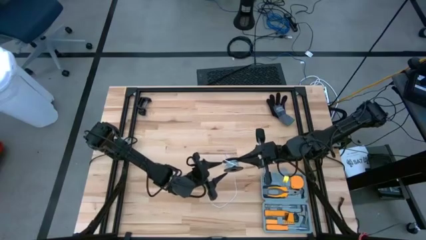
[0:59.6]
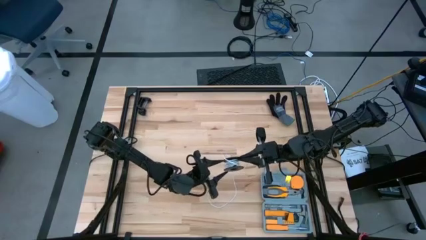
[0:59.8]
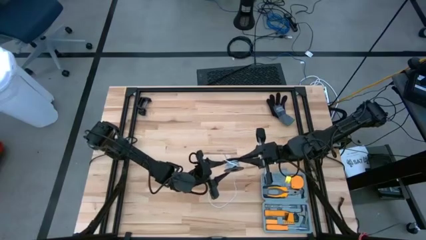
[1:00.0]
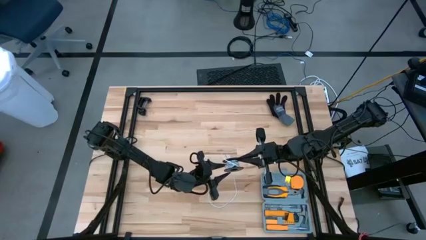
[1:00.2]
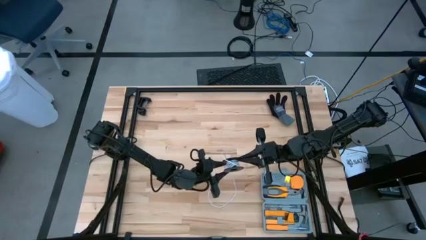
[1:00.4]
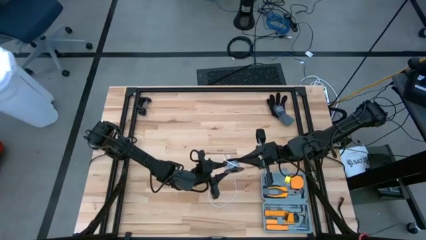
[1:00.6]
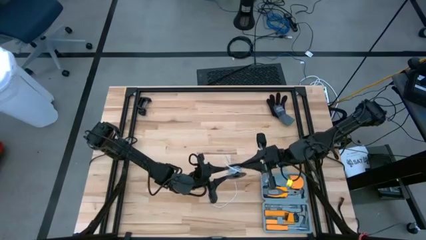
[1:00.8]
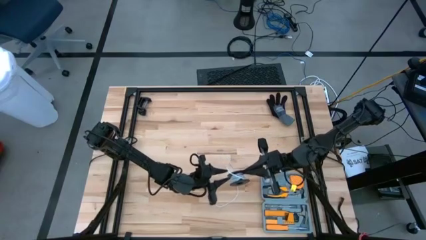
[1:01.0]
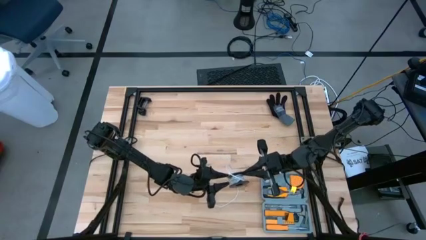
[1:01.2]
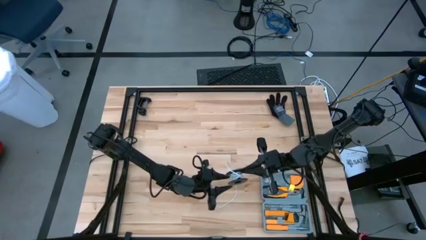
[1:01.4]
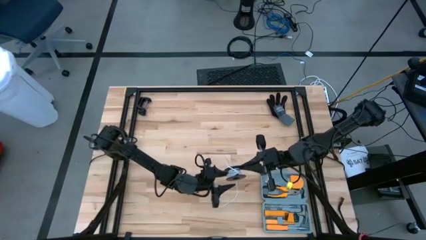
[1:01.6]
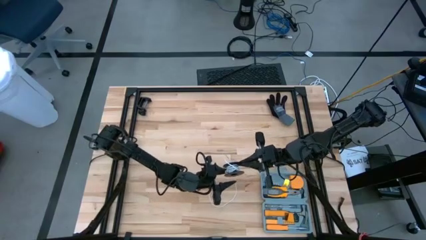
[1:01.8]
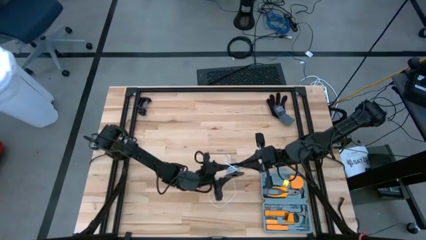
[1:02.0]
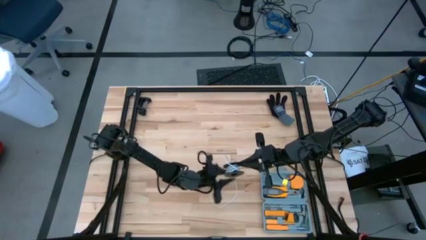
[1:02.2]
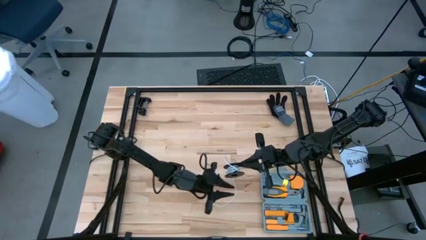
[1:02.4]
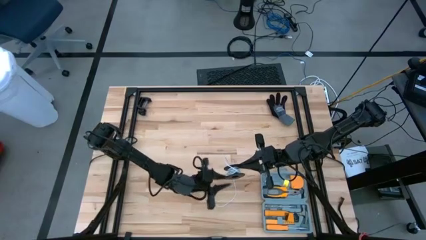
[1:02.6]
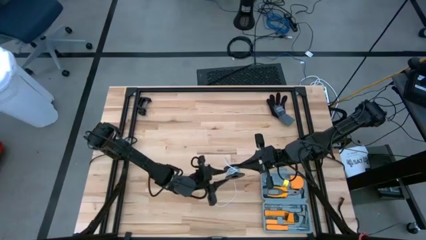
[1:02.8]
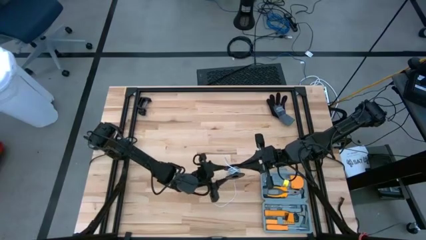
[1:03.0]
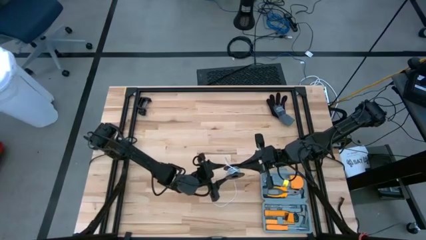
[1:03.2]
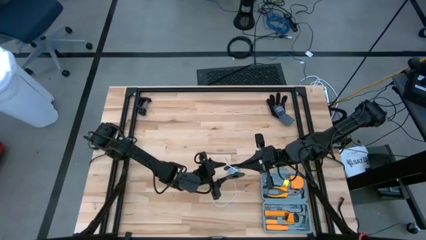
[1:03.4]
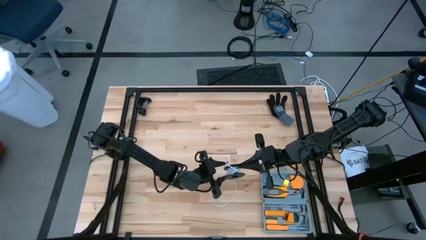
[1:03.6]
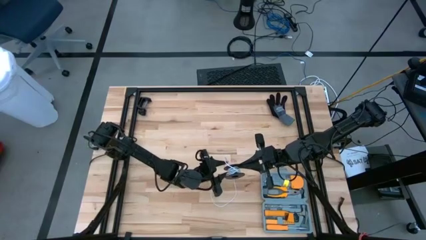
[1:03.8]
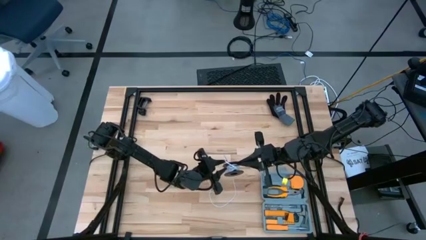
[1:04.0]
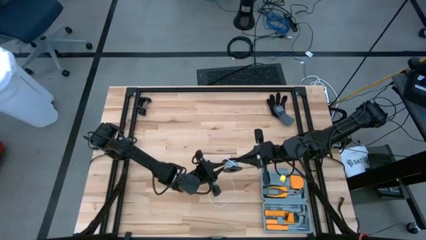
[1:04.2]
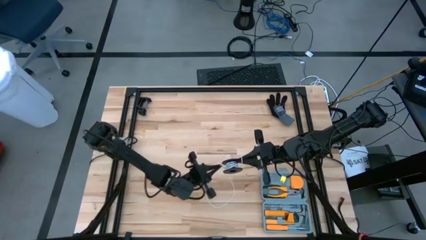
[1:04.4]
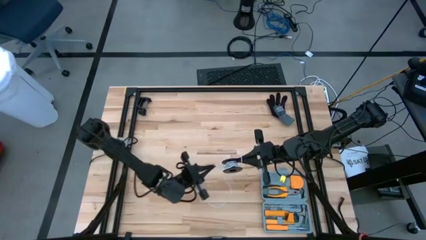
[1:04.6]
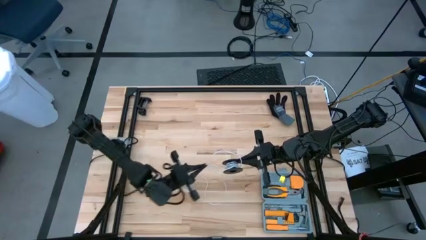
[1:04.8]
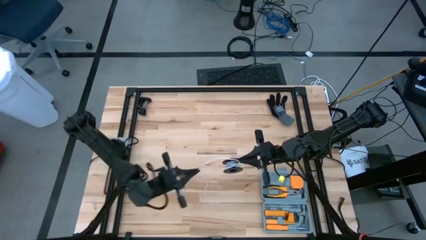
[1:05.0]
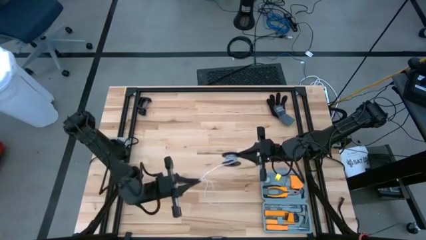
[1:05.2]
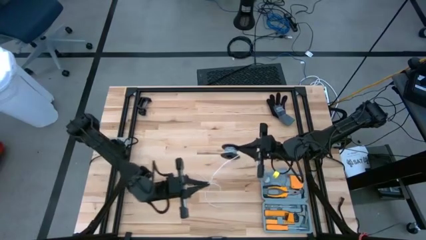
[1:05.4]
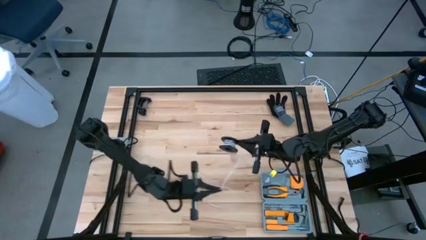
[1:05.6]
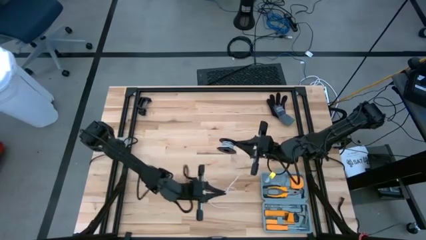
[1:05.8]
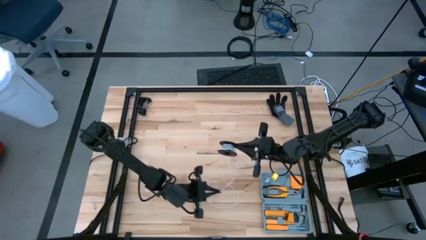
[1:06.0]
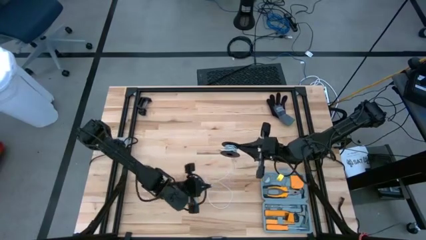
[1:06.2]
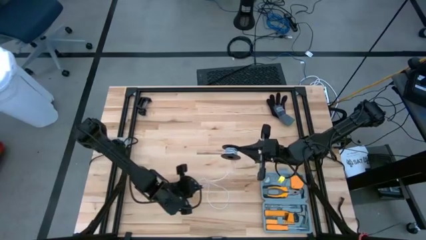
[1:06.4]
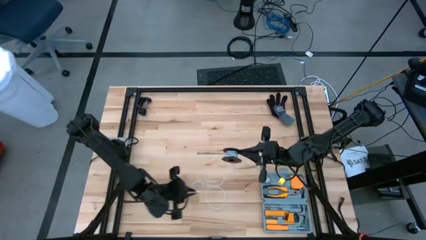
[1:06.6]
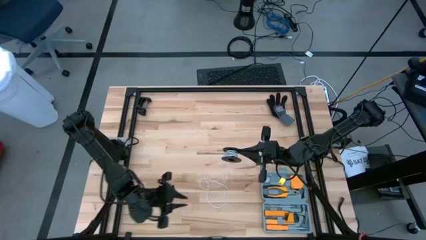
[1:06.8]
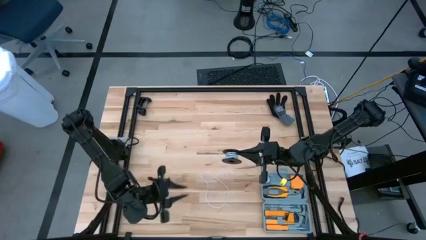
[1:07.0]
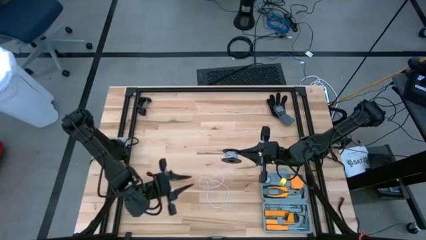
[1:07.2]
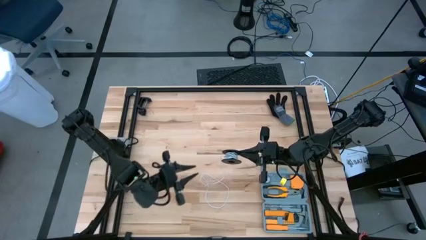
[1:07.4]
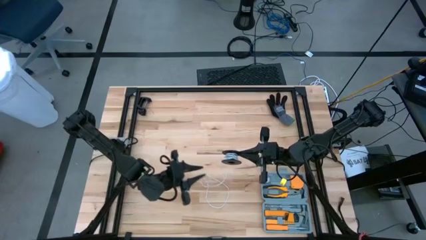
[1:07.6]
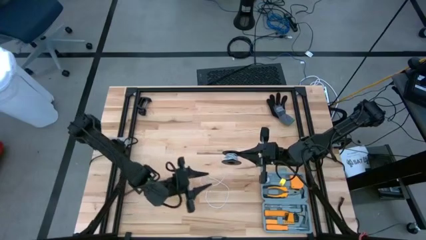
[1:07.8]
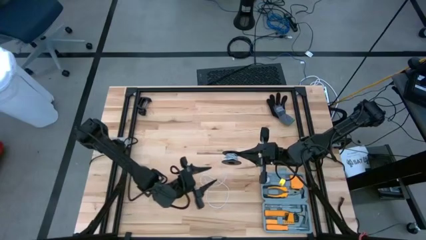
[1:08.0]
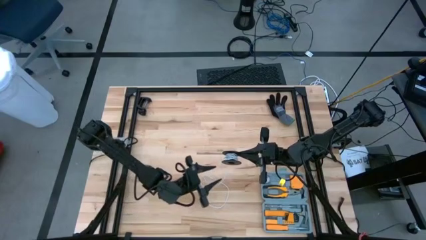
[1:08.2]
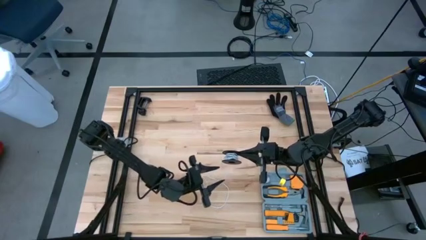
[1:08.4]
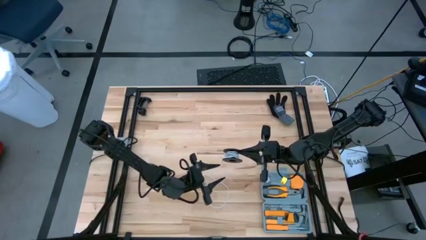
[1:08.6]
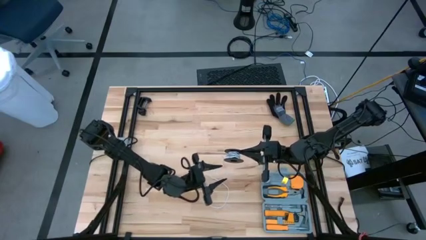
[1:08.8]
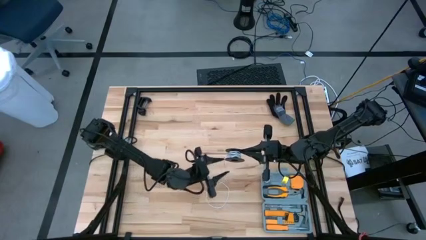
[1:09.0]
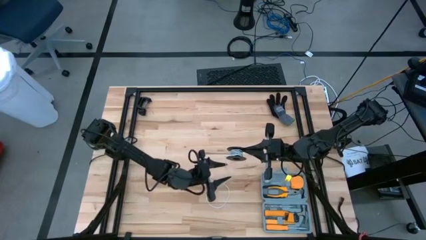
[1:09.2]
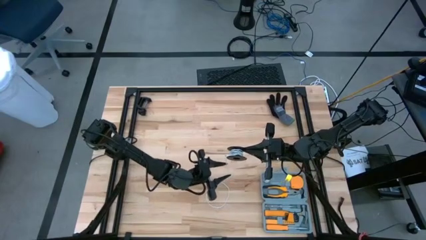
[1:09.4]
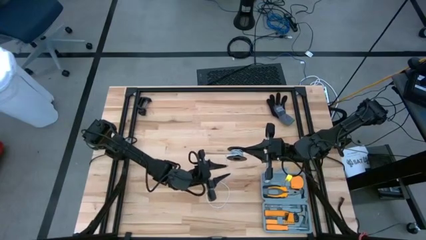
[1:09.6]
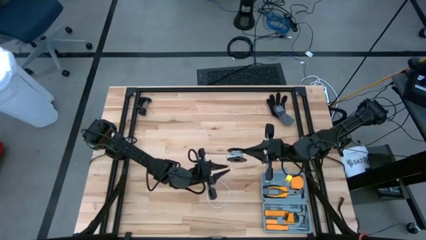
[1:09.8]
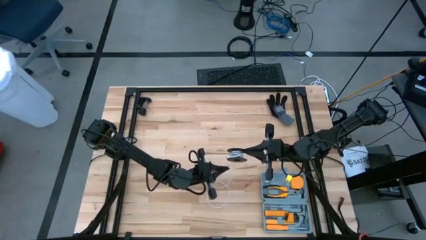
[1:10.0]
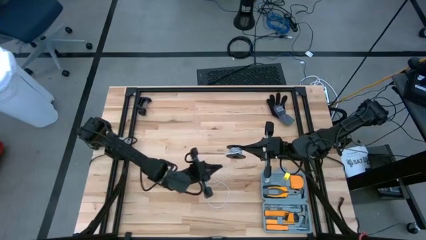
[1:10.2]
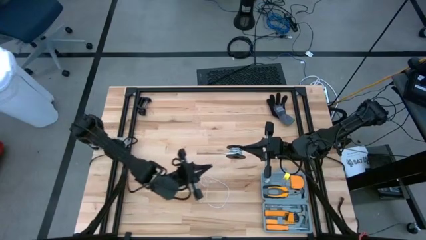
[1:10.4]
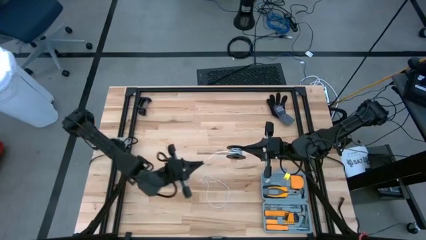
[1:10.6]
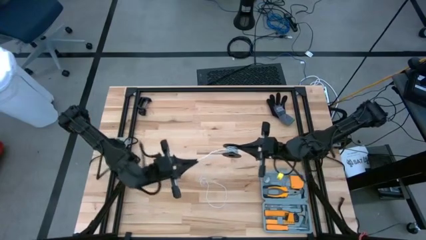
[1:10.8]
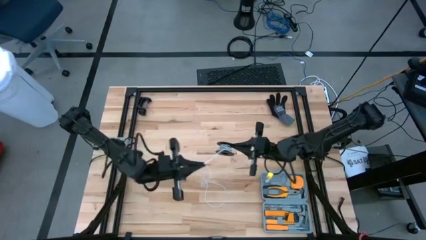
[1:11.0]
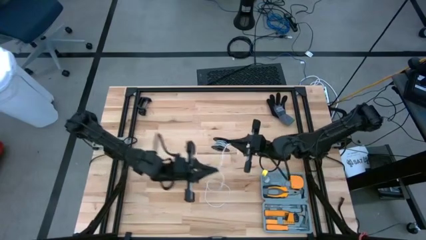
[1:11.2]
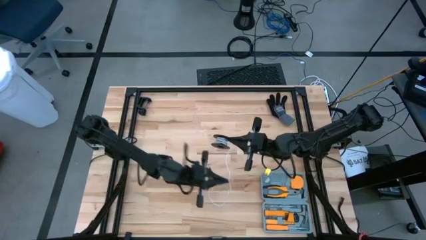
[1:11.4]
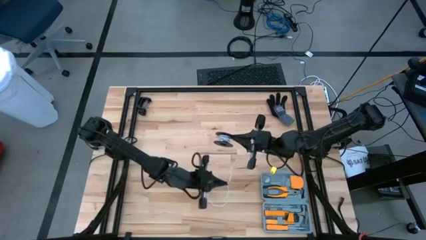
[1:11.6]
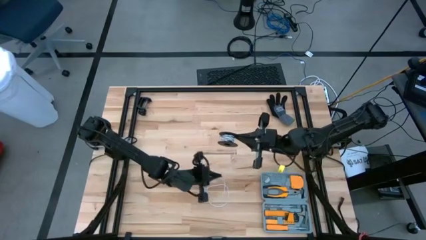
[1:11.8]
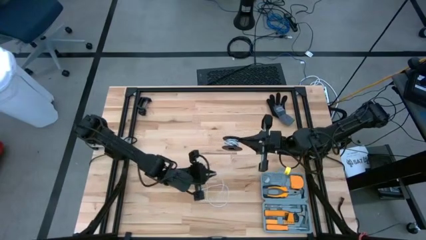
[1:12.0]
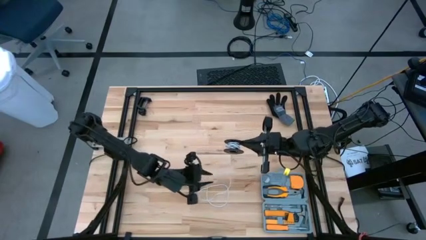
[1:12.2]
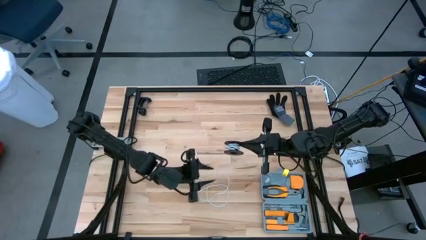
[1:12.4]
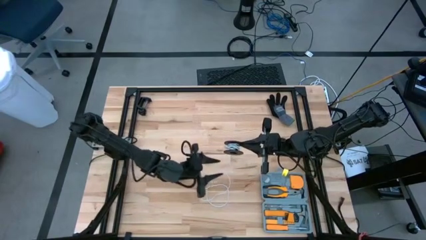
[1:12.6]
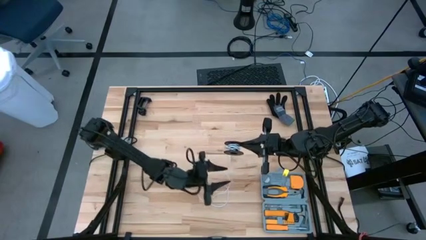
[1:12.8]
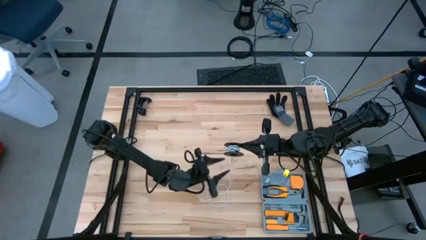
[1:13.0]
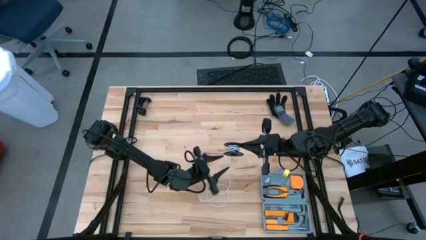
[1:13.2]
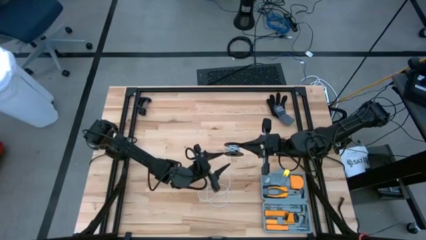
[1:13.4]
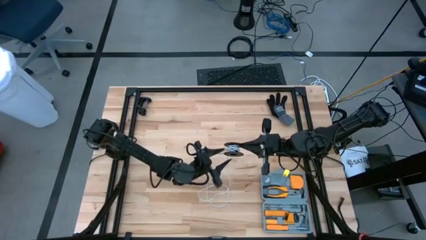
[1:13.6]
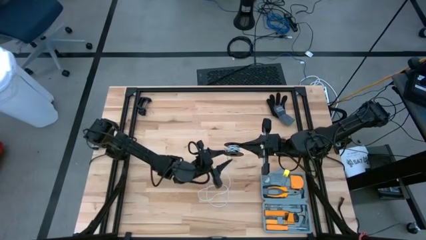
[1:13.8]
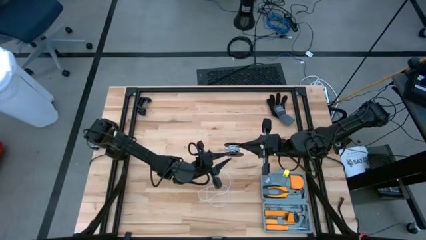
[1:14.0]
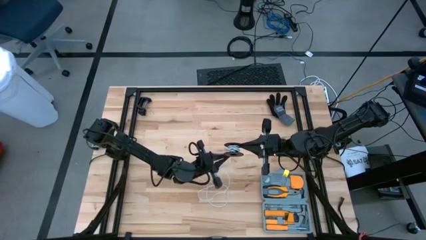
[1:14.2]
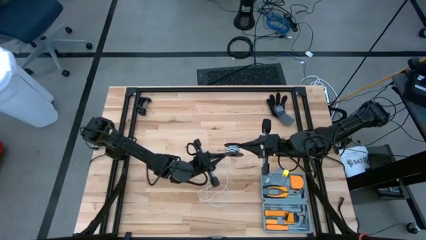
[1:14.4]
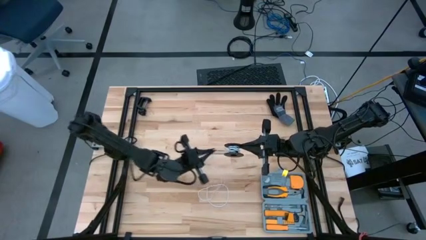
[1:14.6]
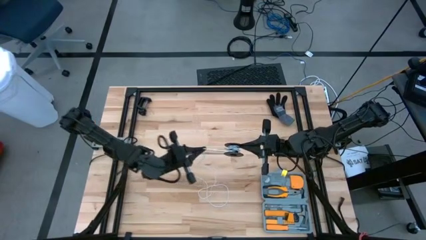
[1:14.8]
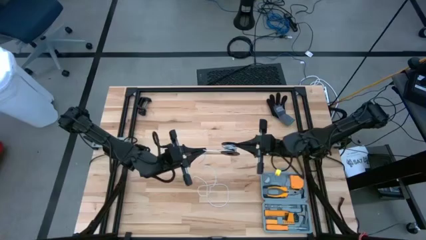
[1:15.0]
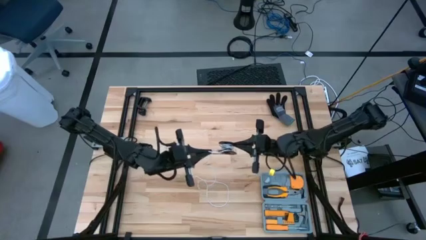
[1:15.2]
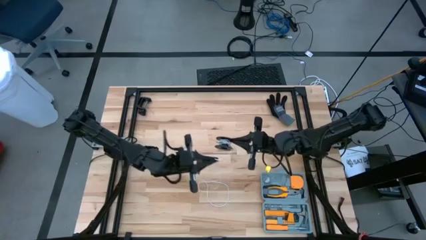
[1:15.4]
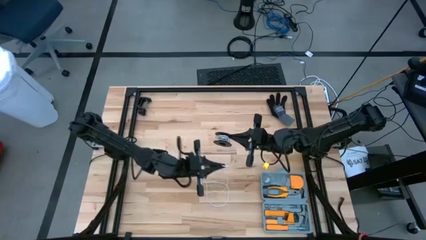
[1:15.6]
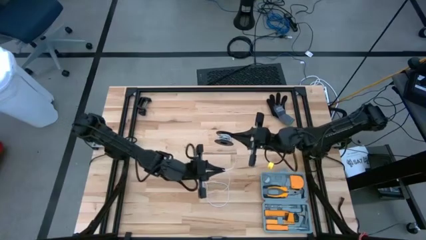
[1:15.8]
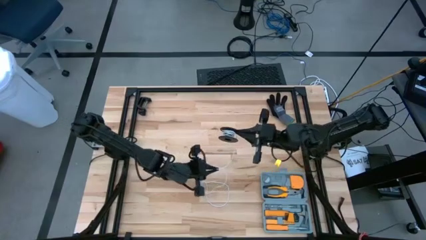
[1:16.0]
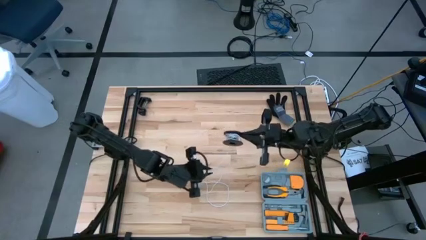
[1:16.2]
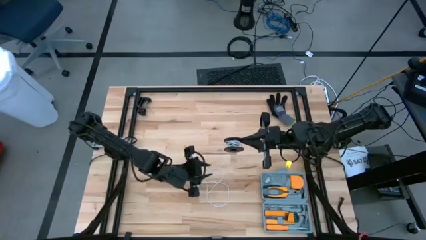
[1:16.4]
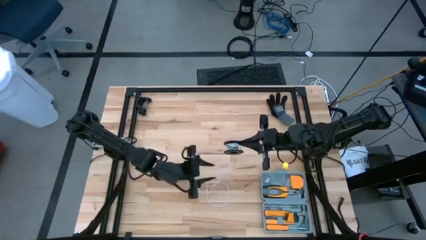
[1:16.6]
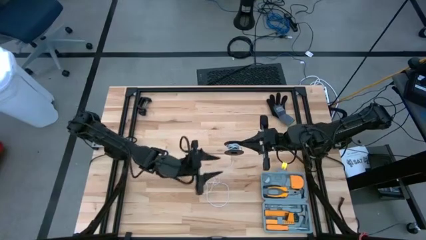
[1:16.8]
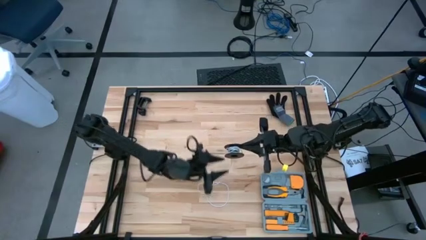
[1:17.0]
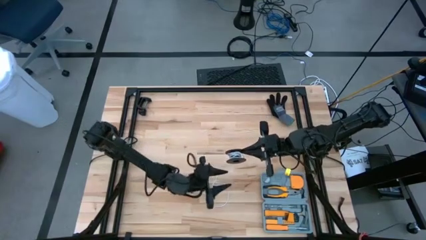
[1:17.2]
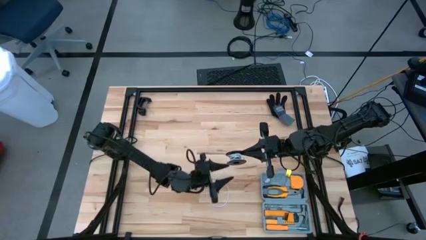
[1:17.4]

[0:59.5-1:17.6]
Task: Coil cords
Uncoil the white cable wire from the spool
